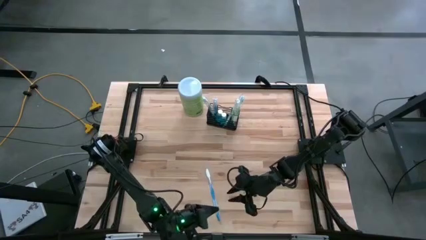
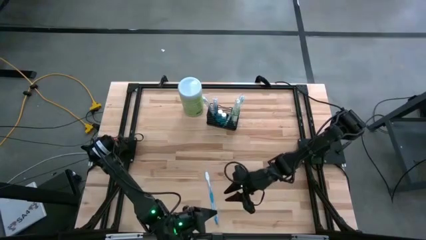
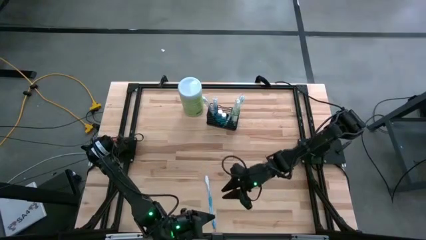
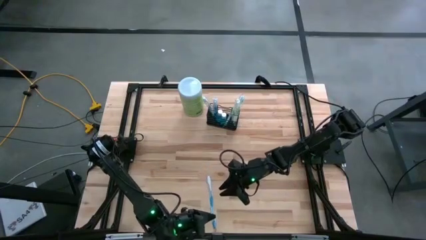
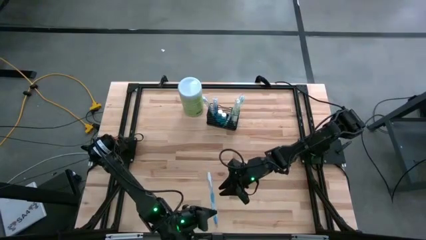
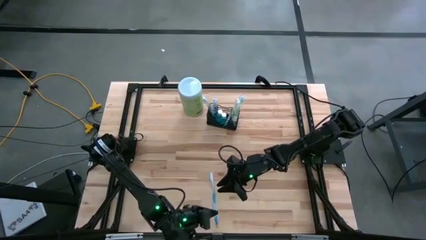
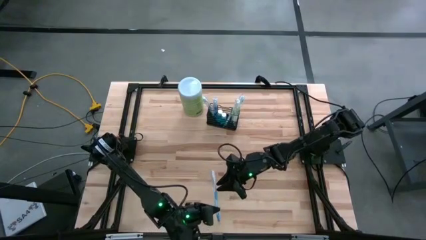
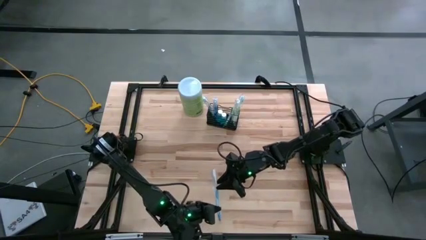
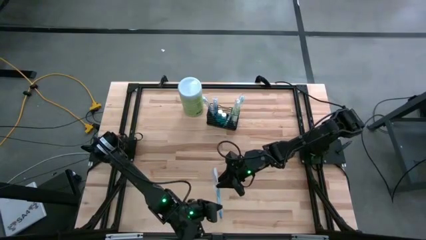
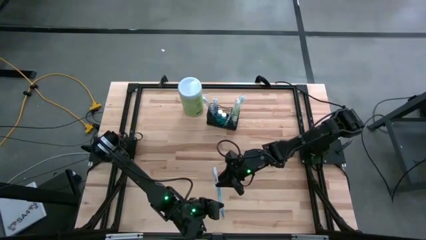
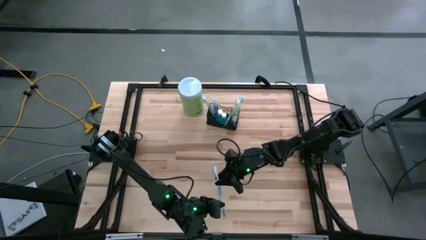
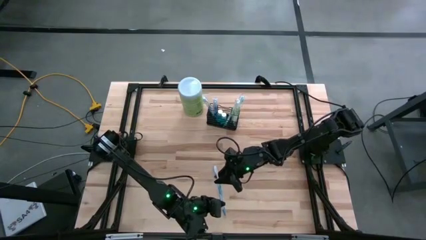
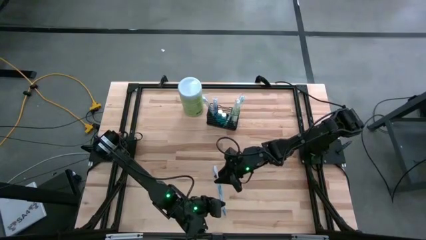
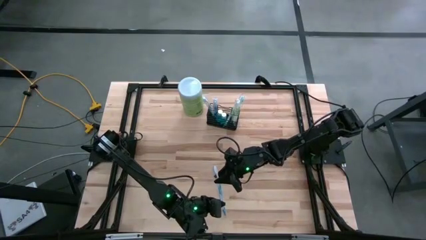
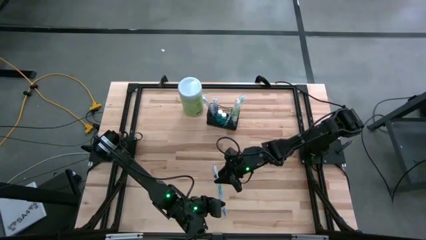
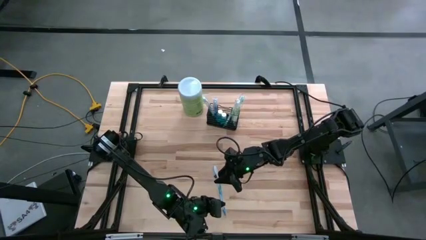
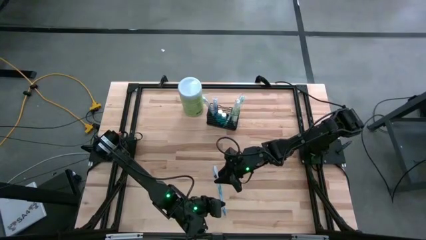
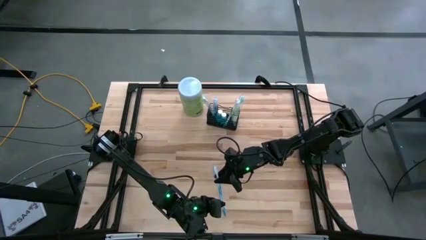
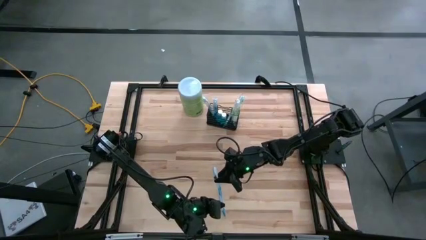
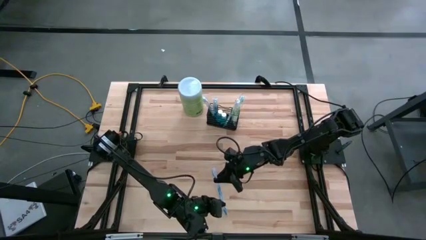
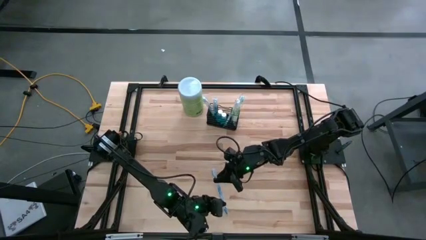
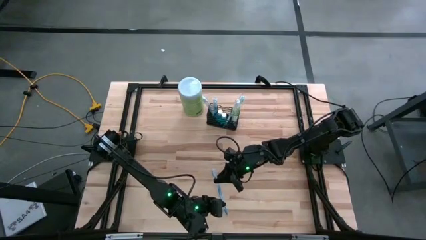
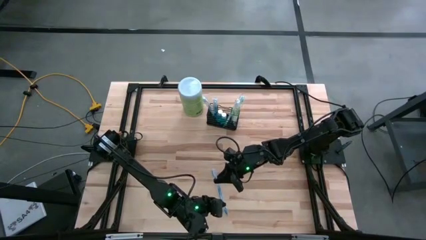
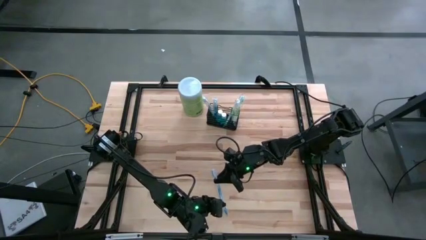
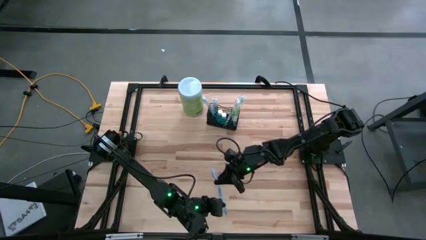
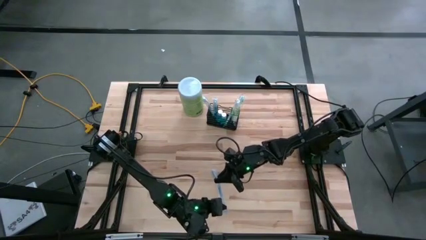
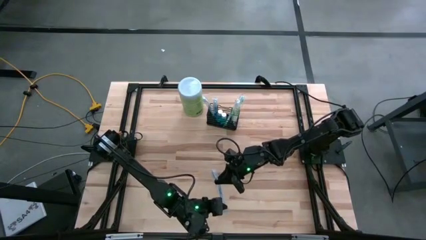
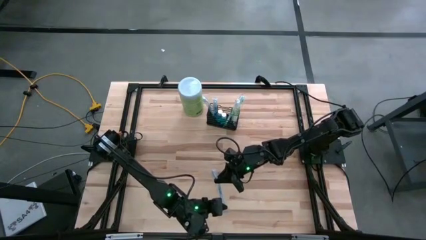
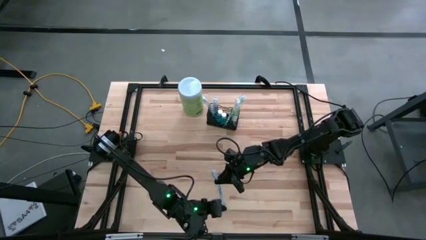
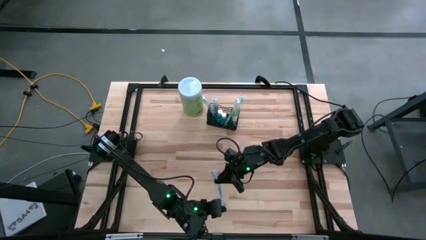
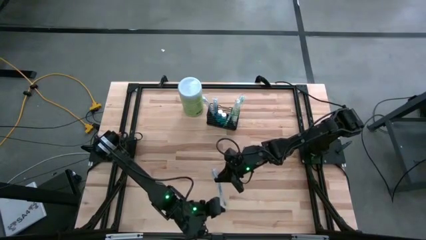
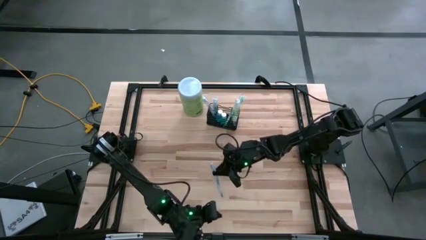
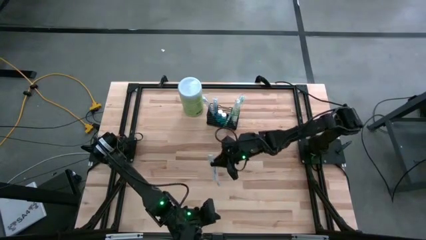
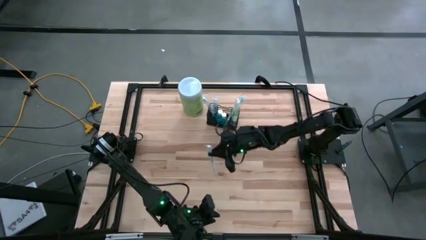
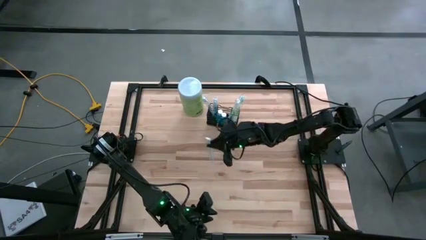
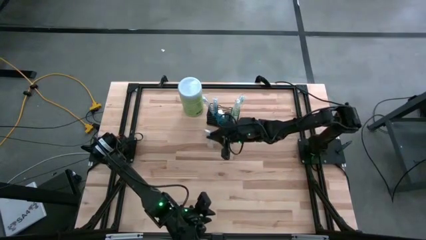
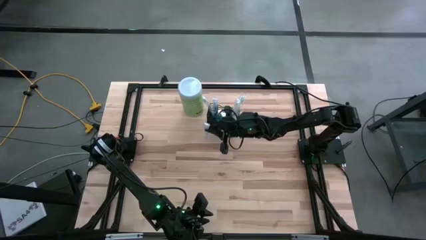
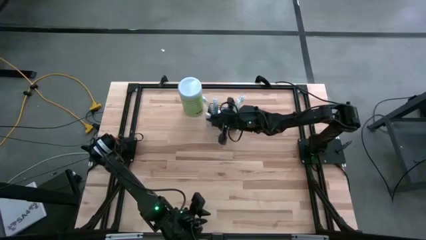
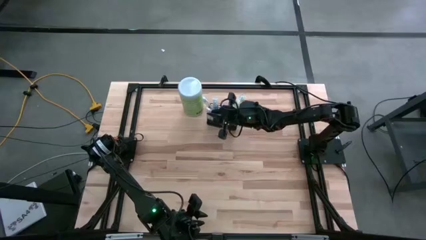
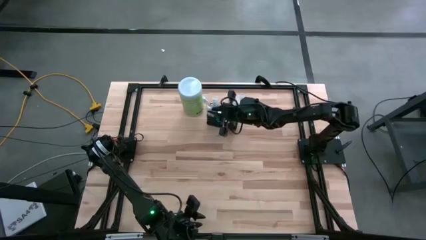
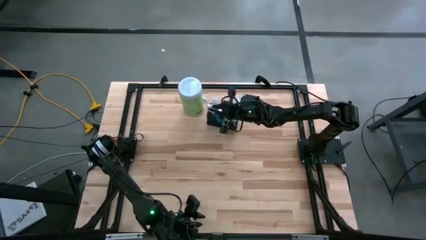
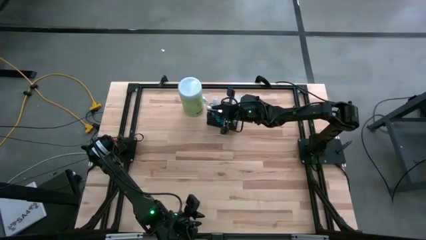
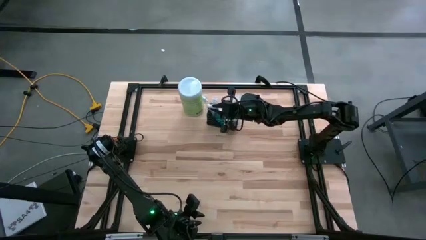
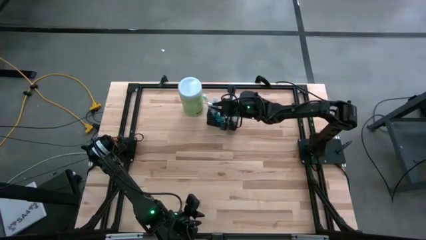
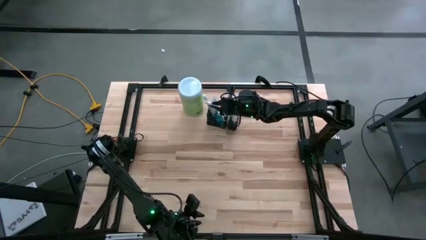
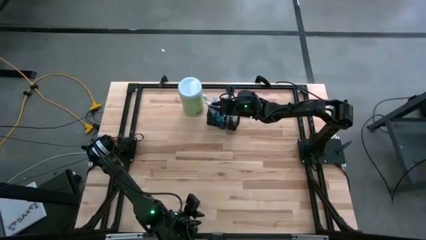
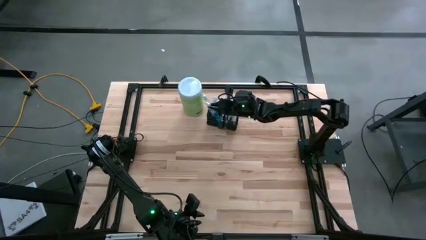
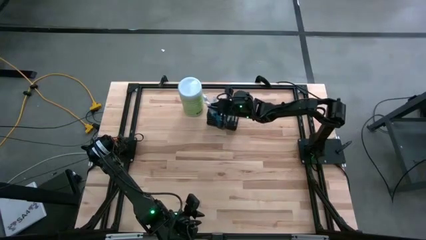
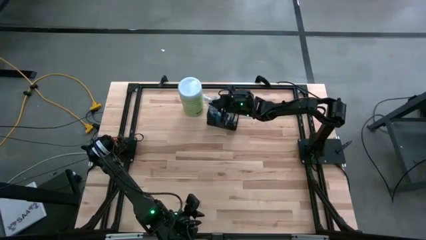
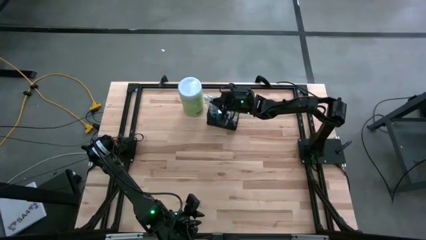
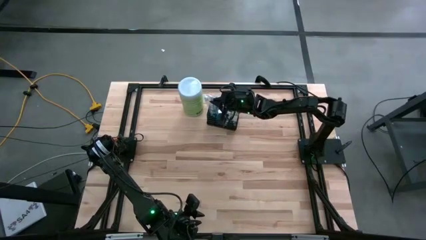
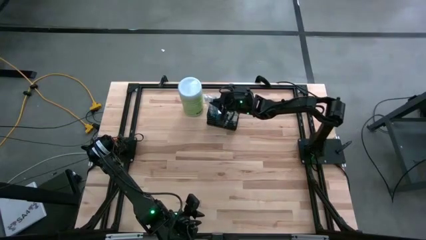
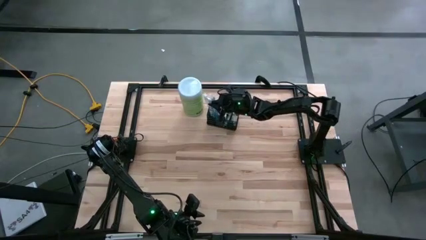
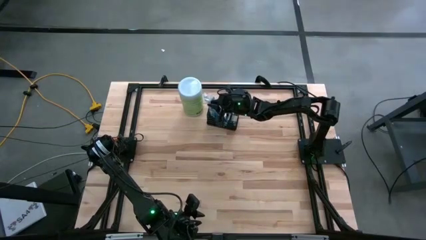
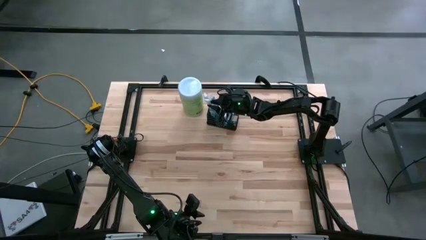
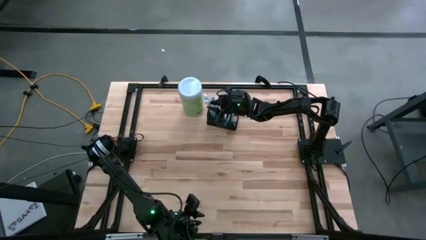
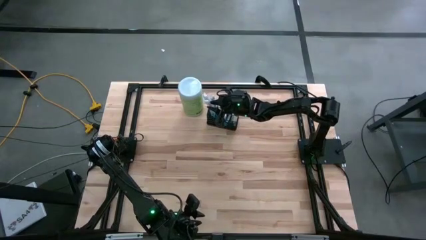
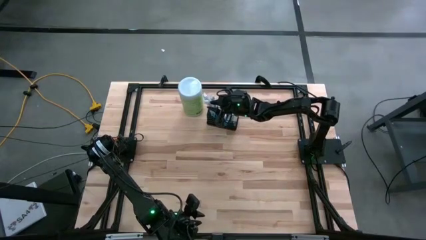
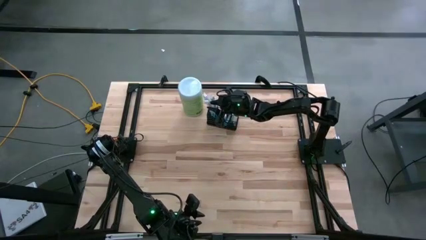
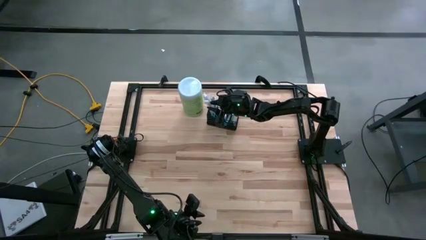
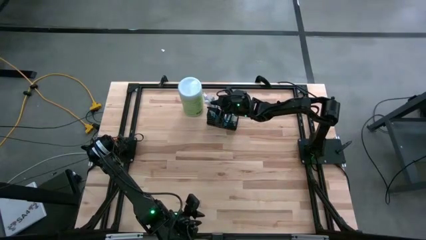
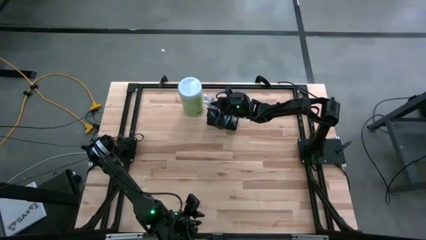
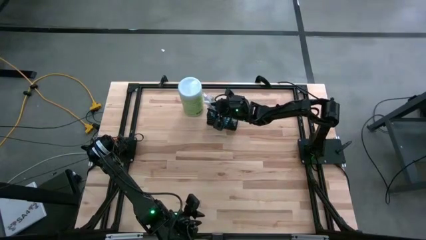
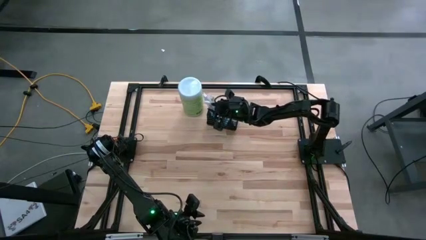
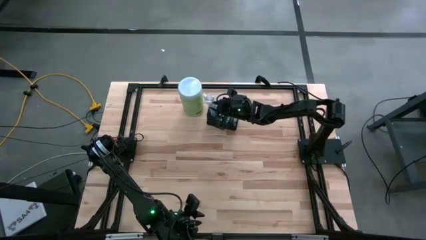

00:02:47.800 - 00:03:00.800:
Task: Pick & Place toothbrushing station
Put the blue toothbrush into the mesh organizer

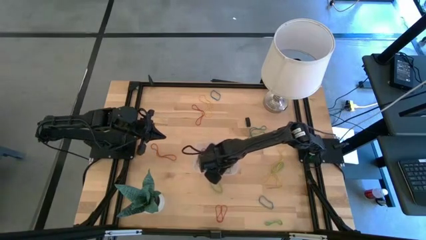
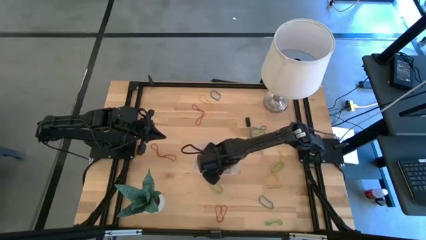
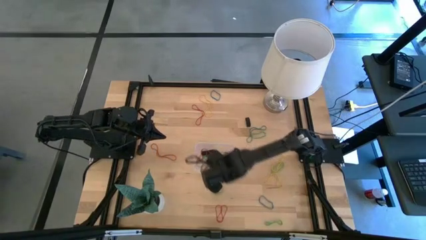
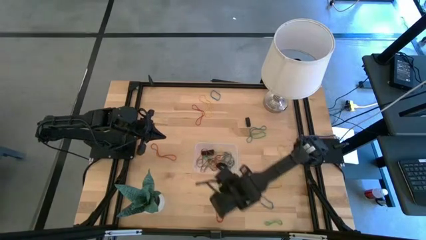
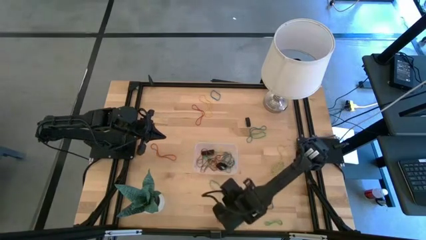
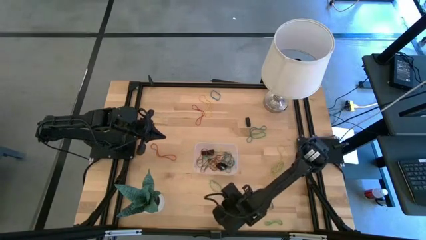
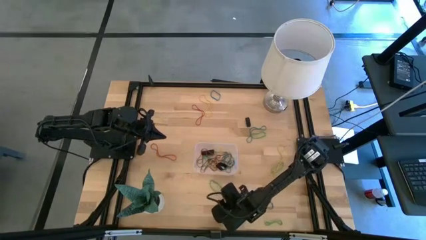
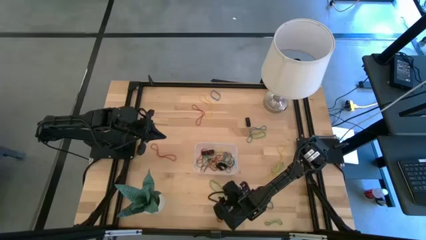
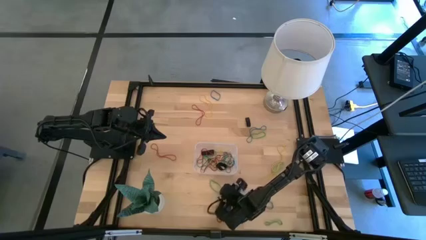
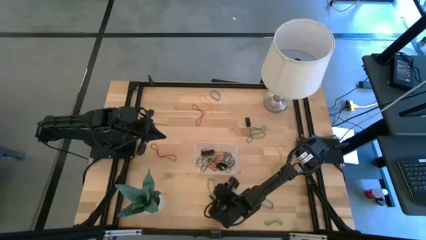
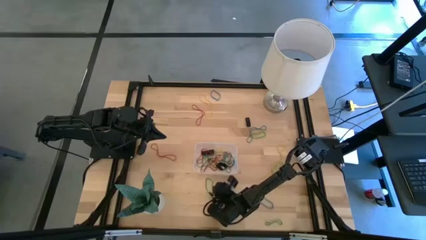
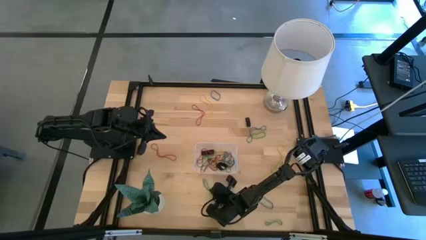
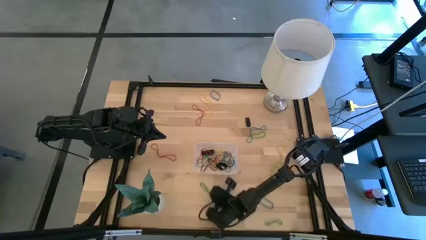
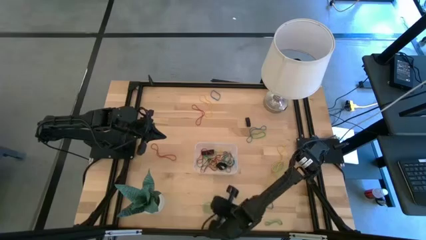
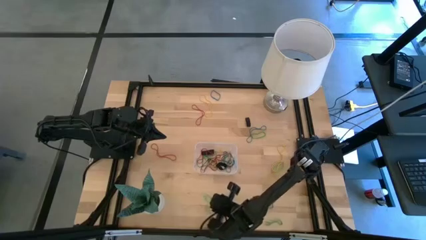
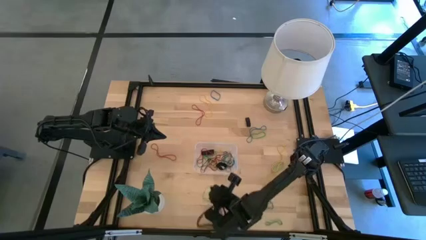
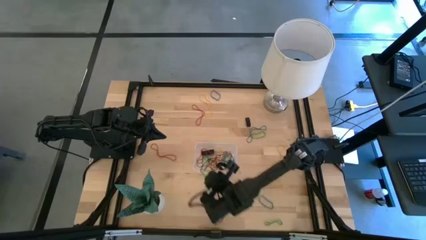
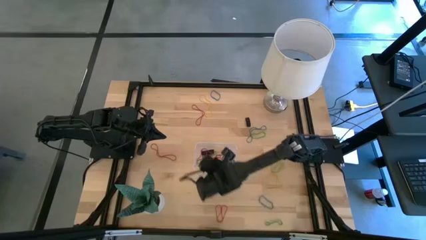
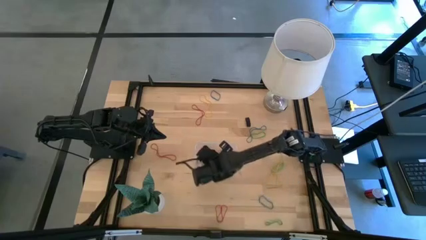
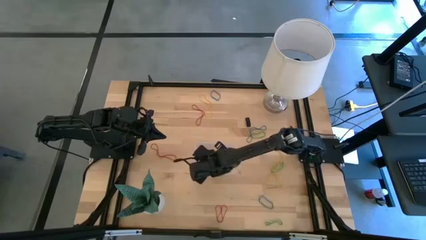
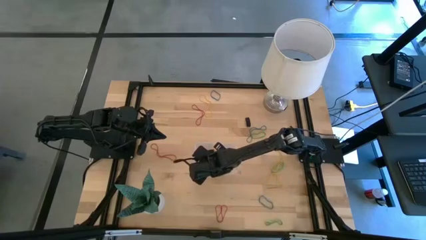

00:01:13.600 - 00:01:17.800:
Task: Pick and place rubber bands into bin
Put the green rubber band into the transparent bin
